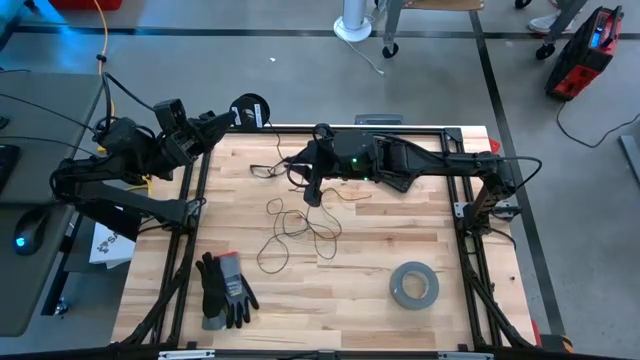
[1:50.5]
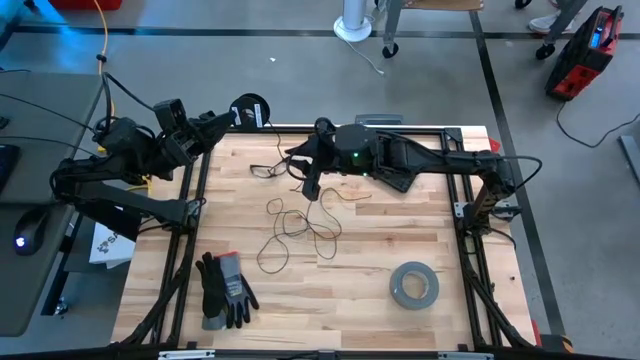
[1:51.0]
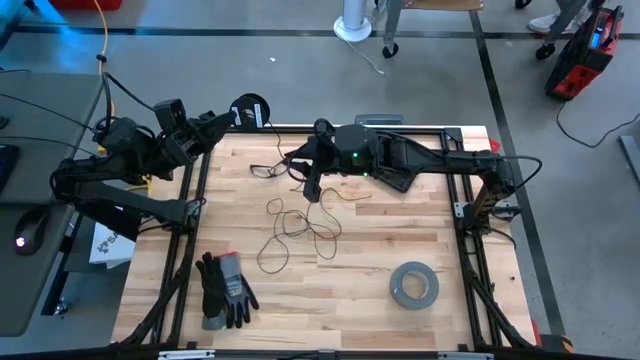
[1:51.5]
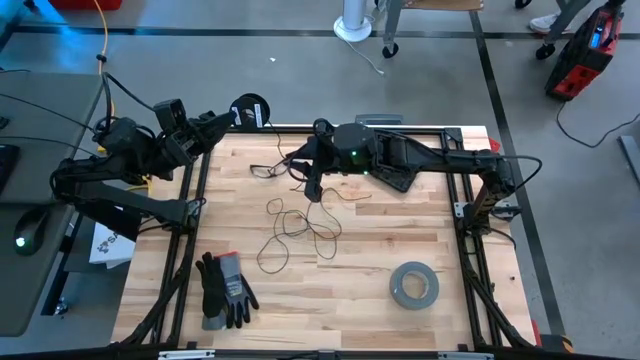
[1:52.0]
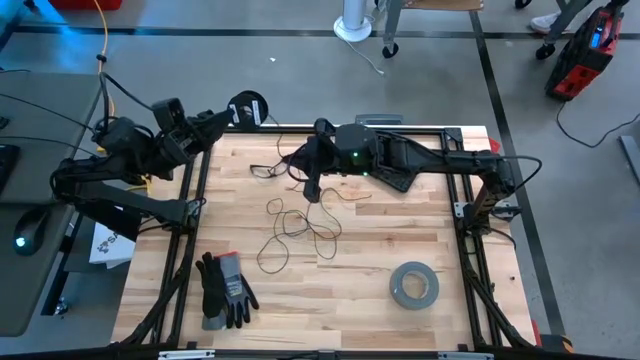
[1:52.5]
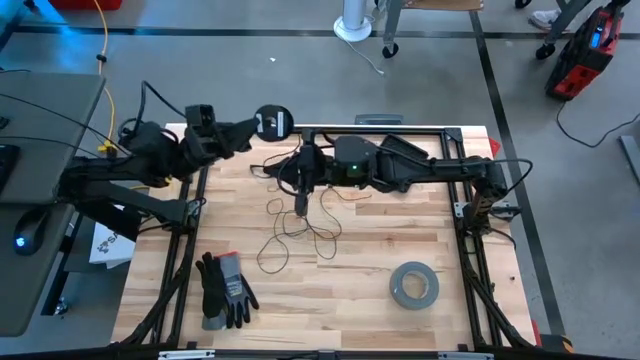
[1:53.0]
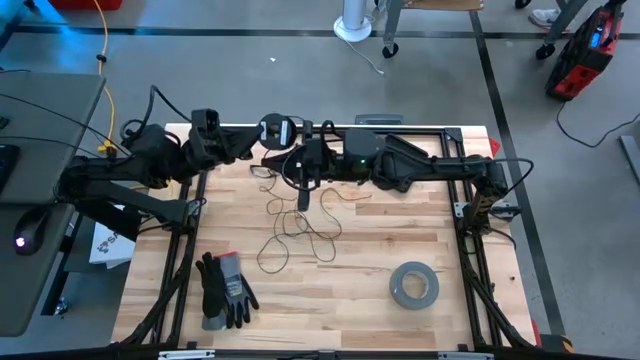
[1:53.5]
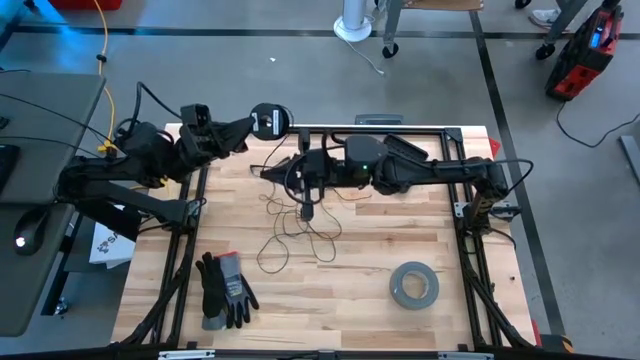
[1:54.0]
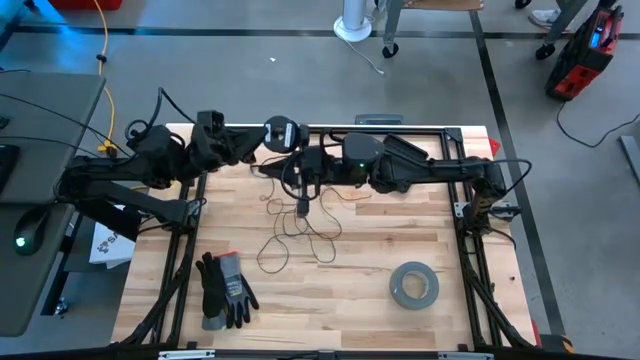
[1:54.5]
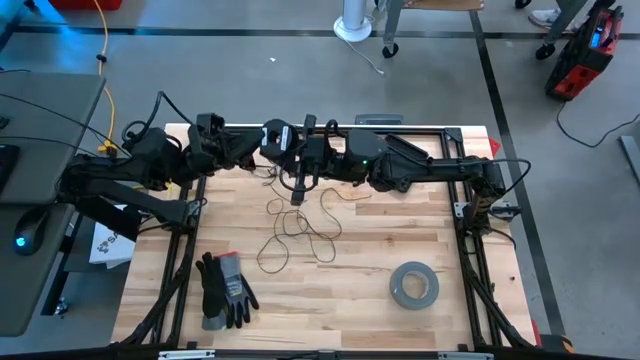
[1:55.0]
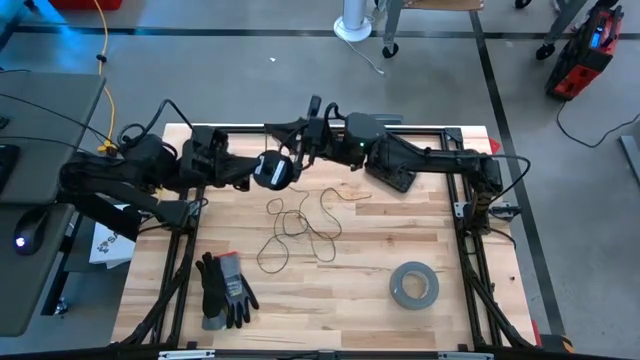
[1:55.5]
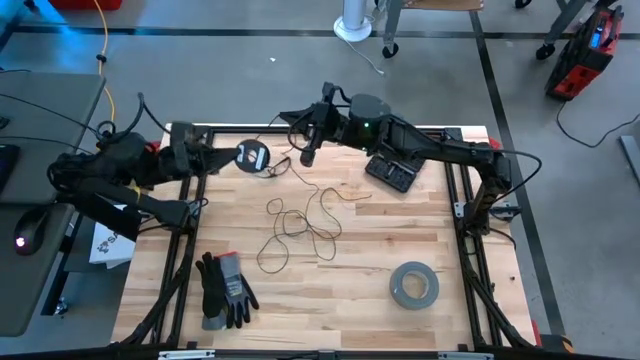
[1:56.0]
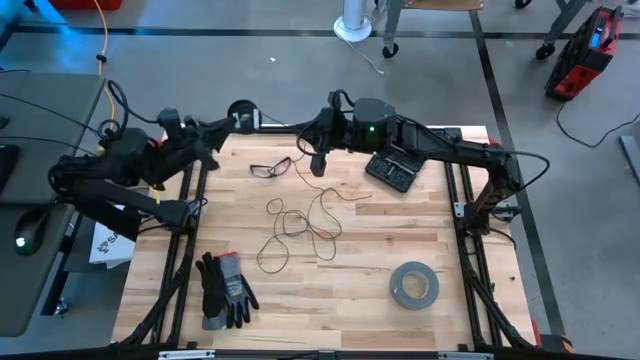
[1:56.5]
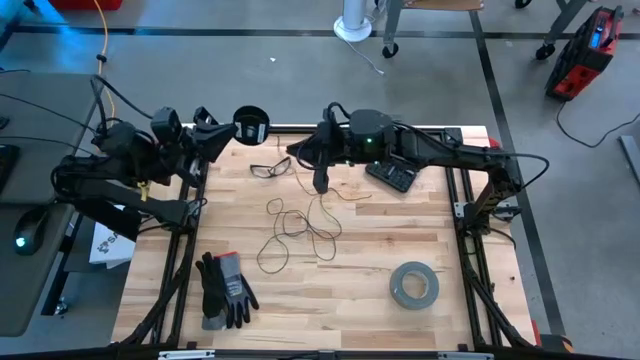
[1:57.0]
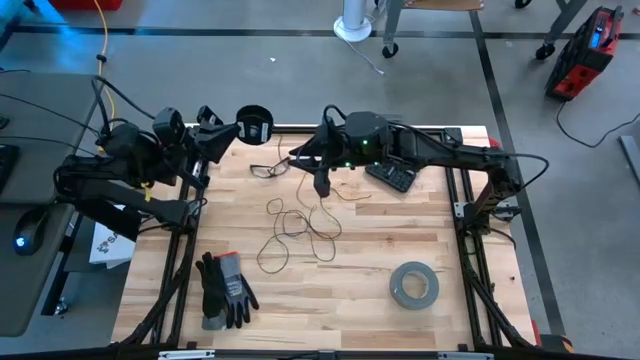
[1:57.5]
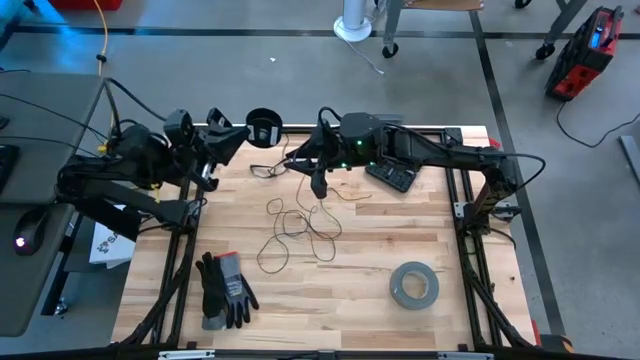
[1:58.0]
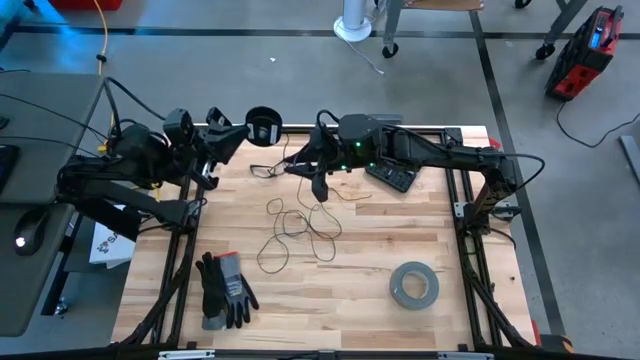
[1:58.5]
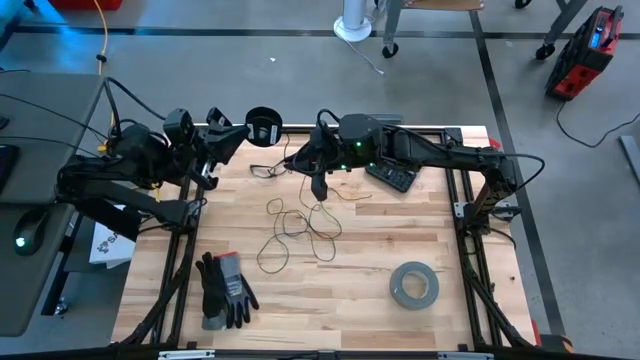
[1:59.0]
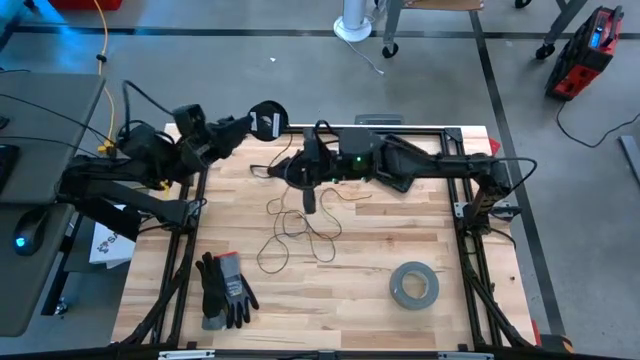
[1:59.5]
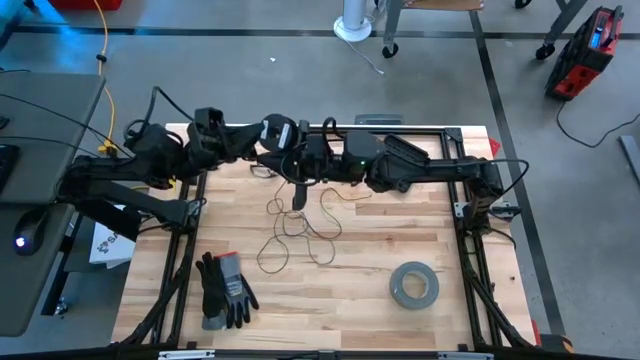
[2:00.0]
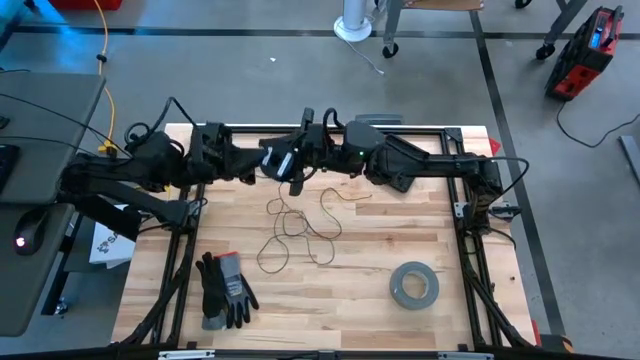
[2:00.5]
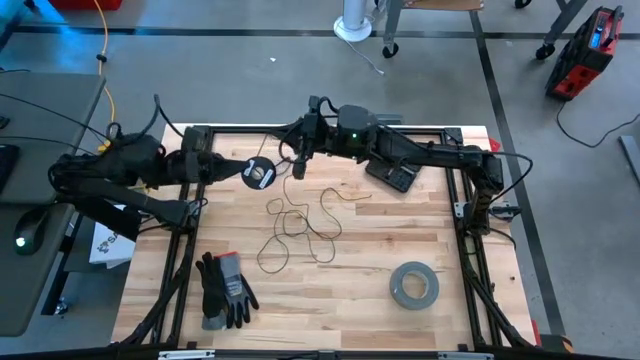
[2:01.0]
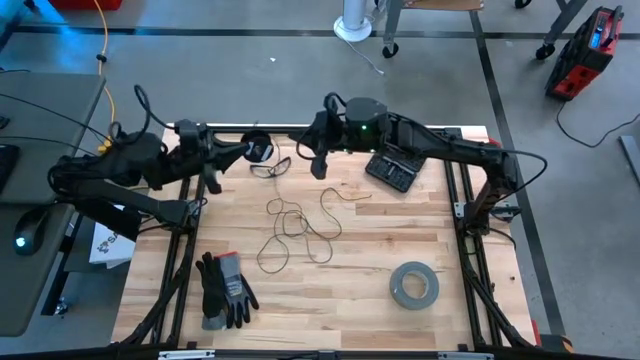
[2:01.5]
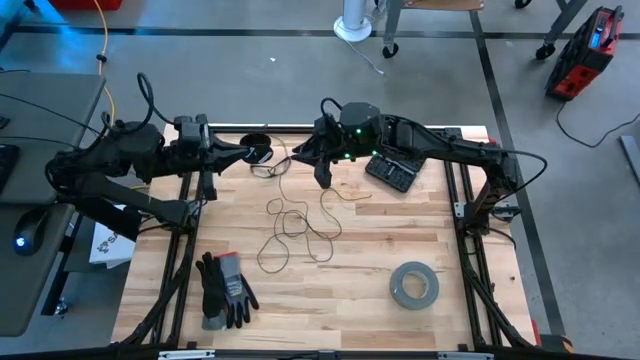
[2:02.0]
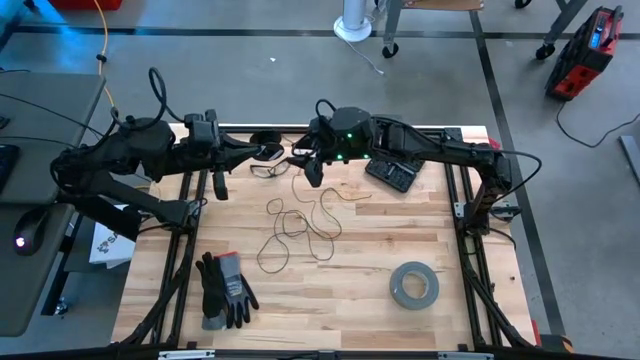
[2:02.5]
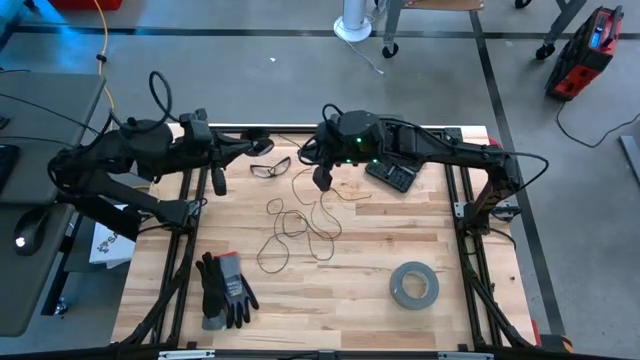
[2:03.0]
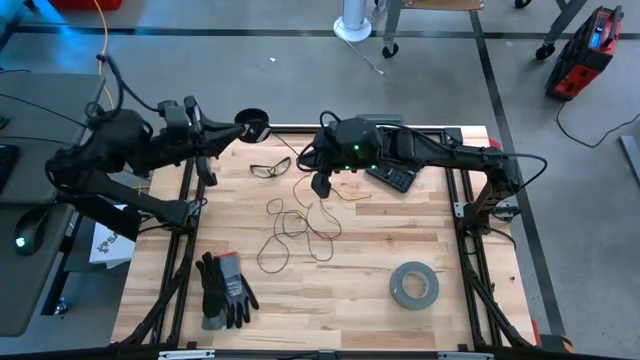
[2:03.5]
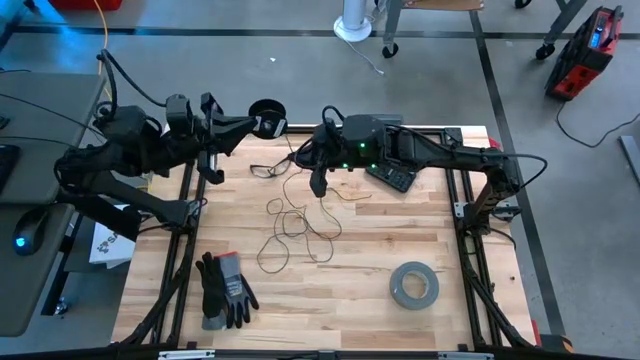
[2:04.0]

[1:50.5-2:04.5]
Task: Coil cords
Coil the black wire on the black spool
